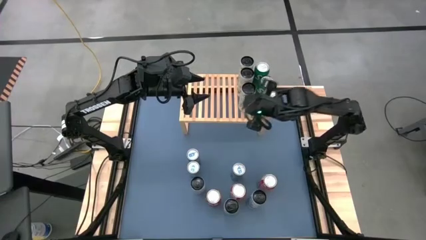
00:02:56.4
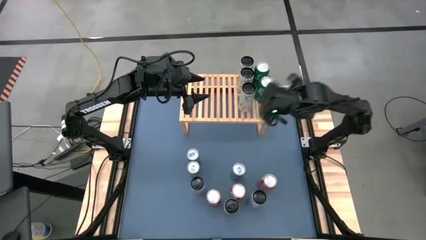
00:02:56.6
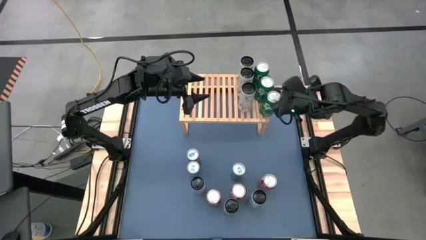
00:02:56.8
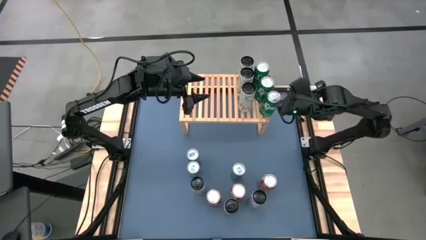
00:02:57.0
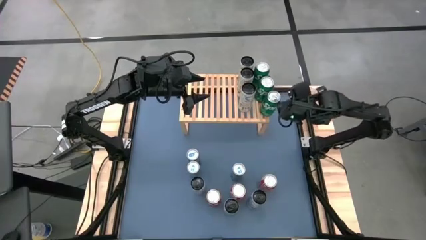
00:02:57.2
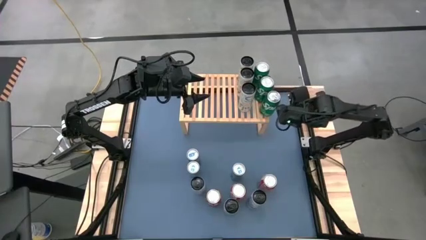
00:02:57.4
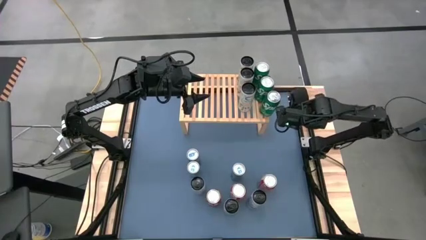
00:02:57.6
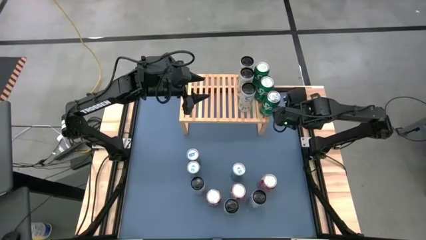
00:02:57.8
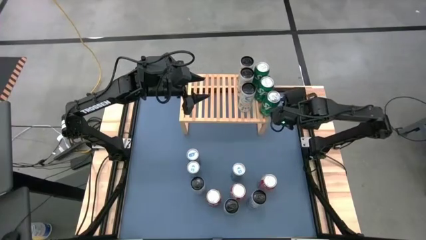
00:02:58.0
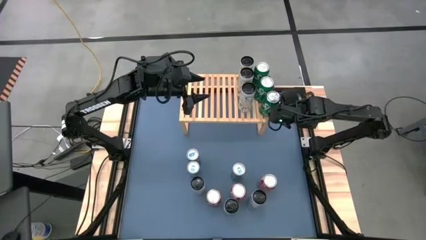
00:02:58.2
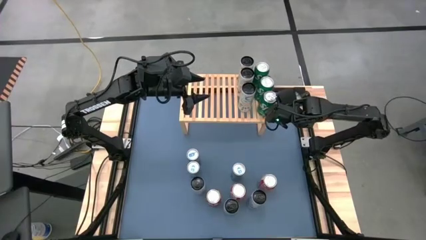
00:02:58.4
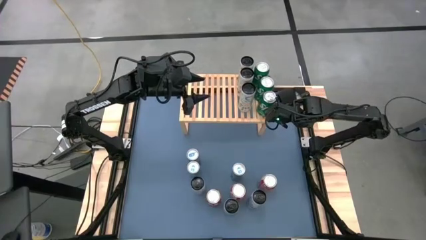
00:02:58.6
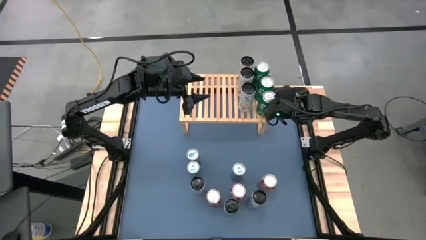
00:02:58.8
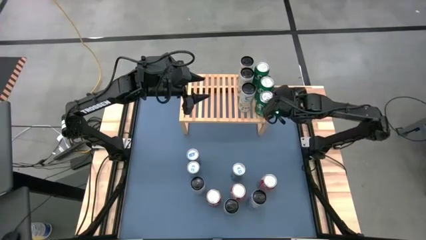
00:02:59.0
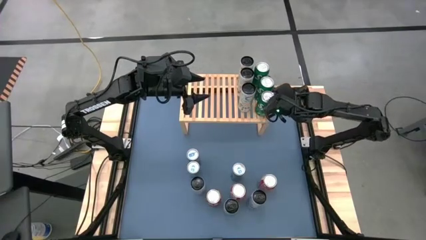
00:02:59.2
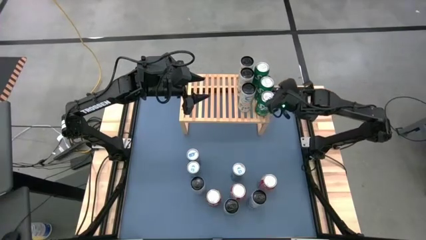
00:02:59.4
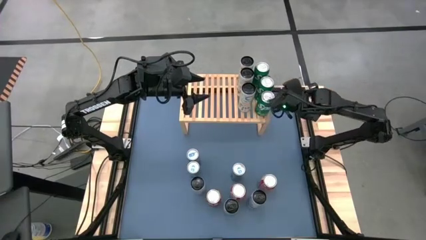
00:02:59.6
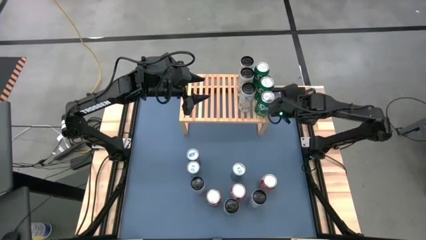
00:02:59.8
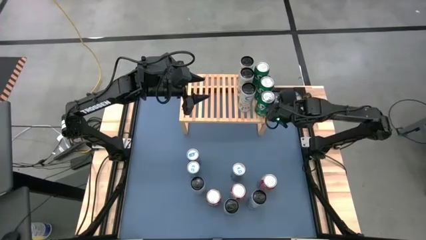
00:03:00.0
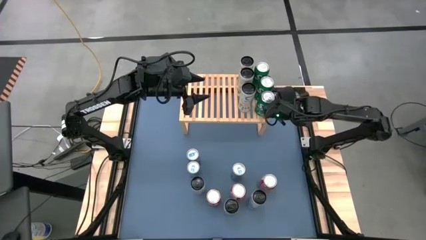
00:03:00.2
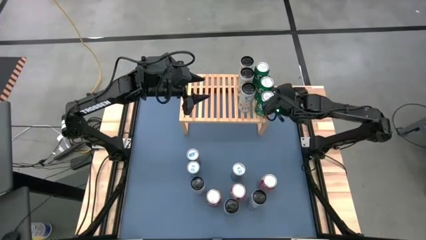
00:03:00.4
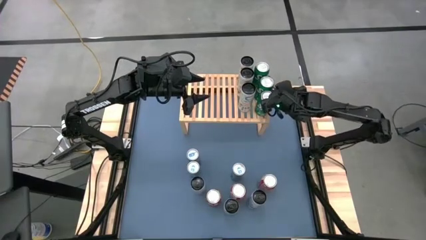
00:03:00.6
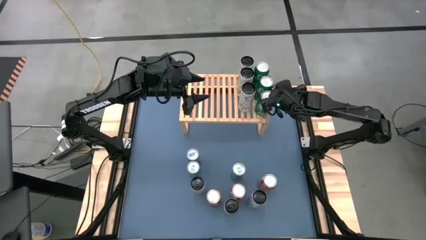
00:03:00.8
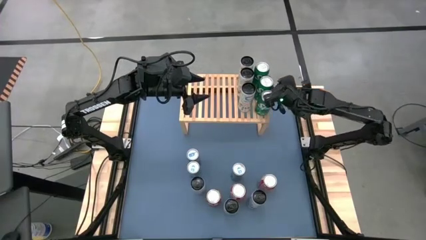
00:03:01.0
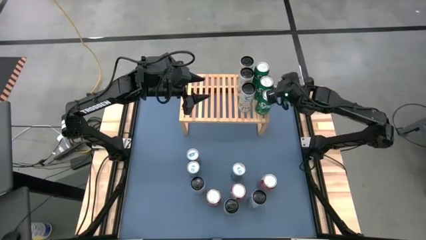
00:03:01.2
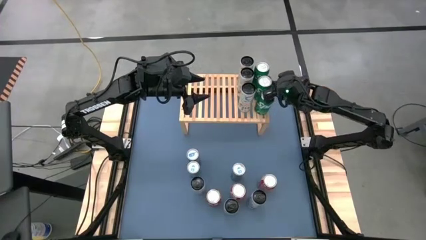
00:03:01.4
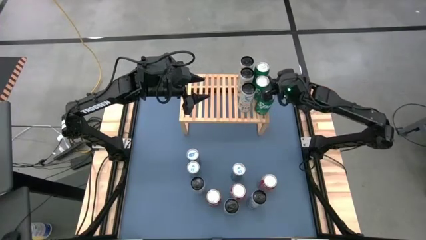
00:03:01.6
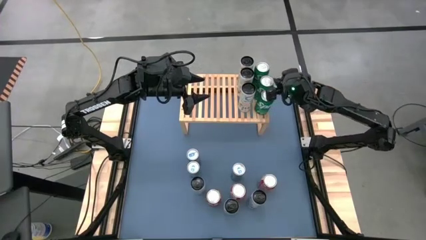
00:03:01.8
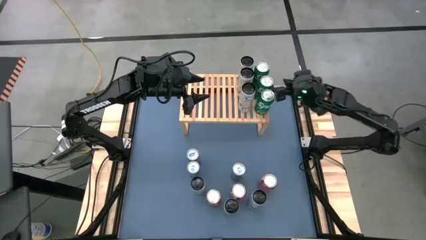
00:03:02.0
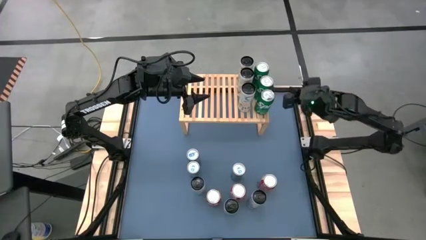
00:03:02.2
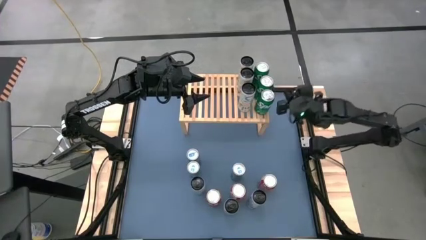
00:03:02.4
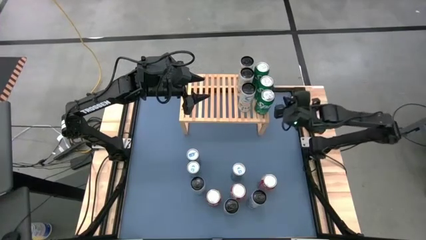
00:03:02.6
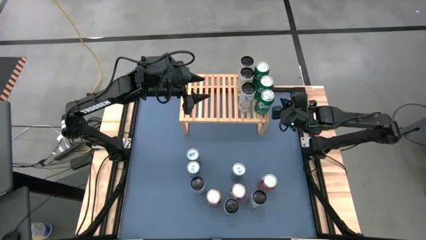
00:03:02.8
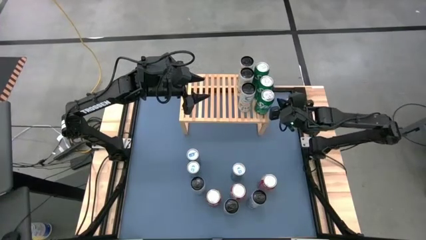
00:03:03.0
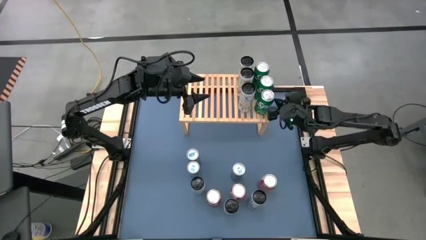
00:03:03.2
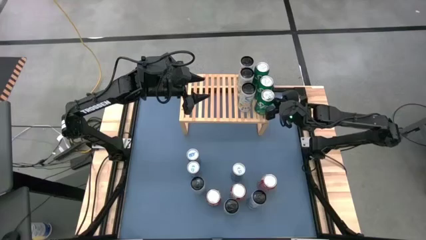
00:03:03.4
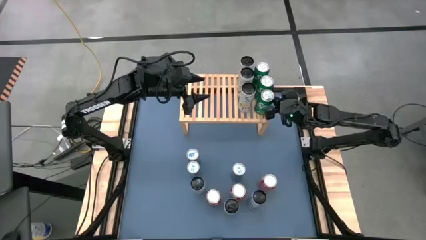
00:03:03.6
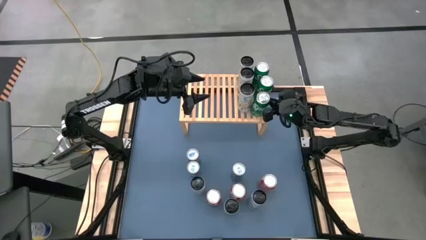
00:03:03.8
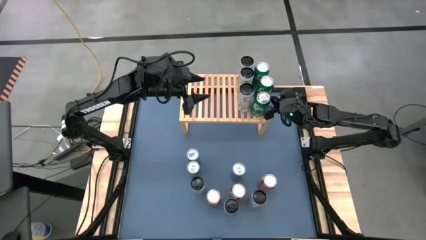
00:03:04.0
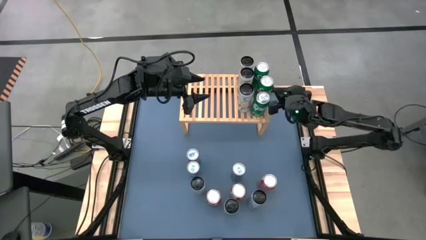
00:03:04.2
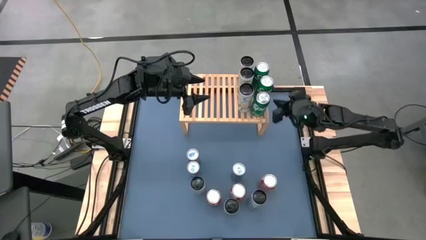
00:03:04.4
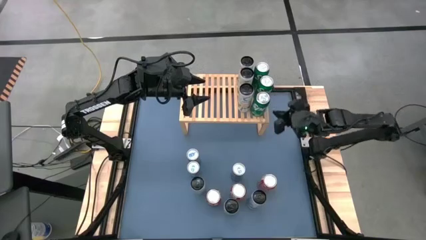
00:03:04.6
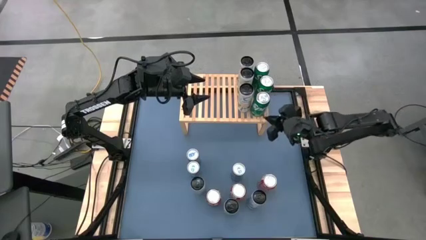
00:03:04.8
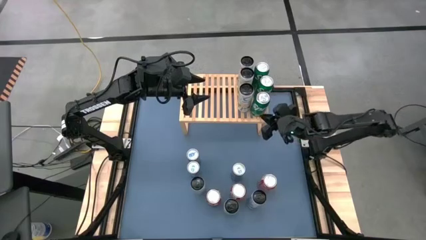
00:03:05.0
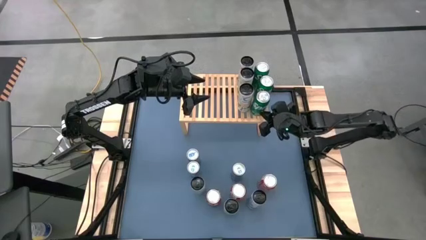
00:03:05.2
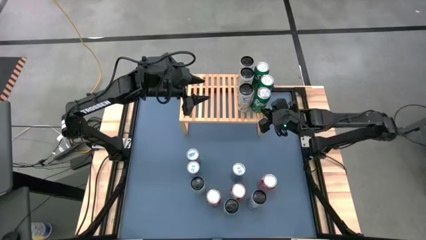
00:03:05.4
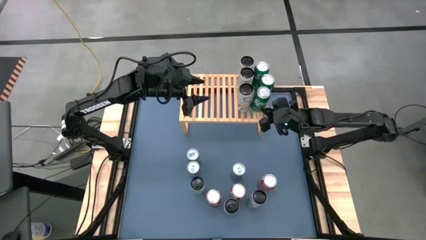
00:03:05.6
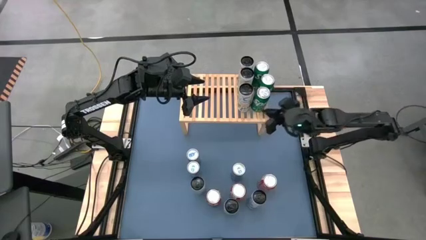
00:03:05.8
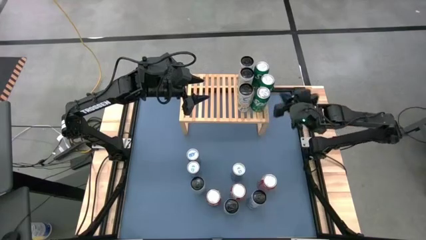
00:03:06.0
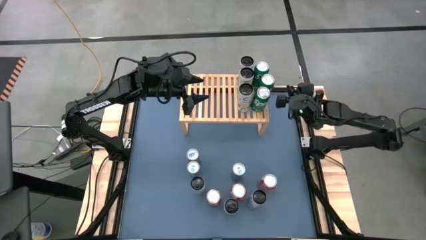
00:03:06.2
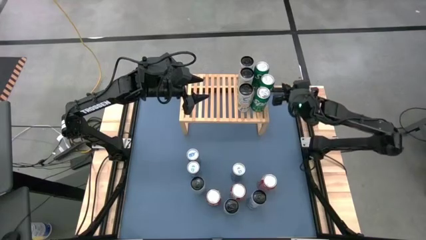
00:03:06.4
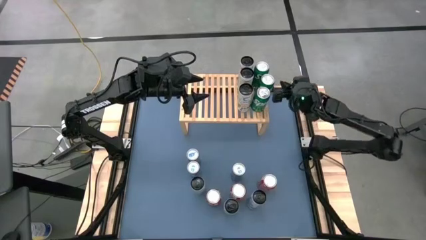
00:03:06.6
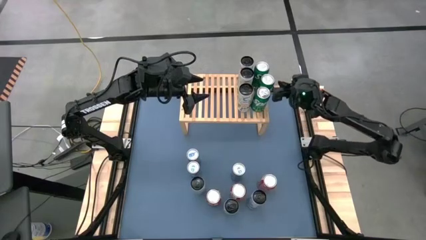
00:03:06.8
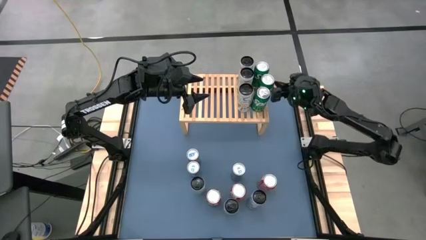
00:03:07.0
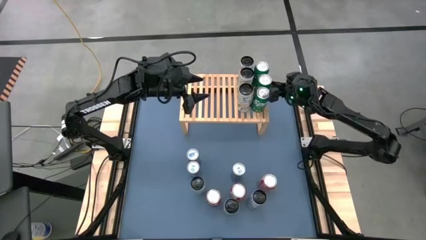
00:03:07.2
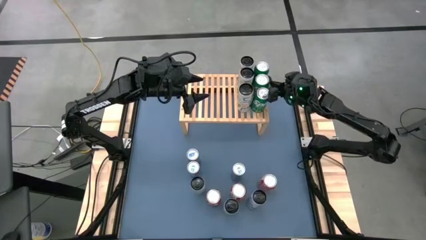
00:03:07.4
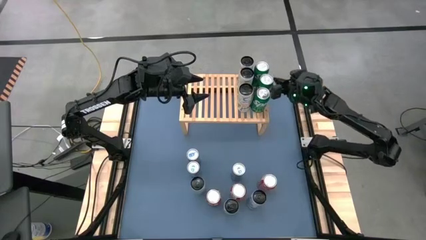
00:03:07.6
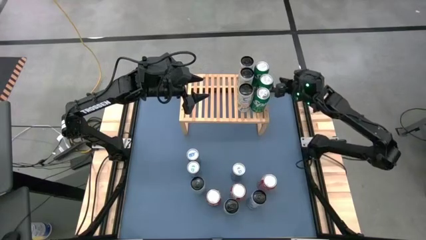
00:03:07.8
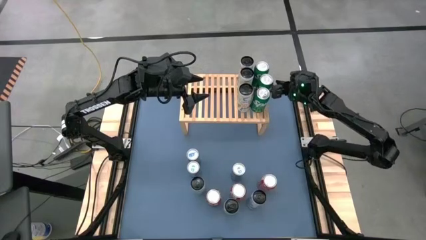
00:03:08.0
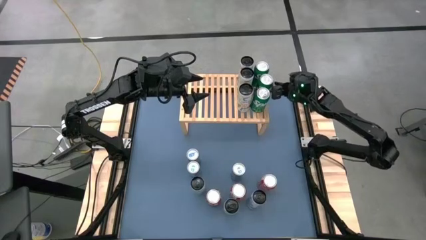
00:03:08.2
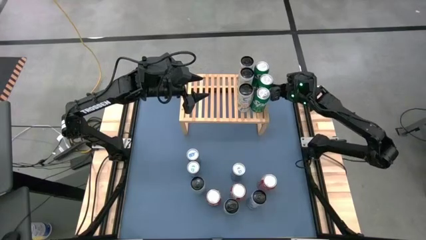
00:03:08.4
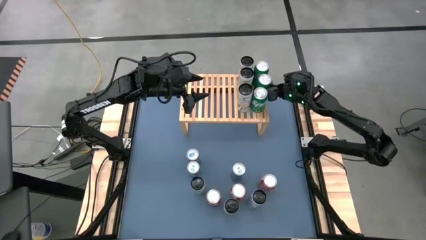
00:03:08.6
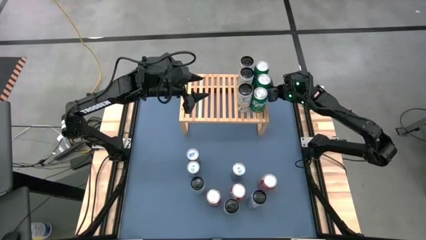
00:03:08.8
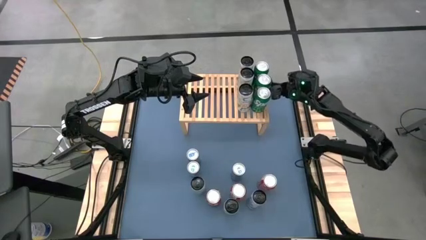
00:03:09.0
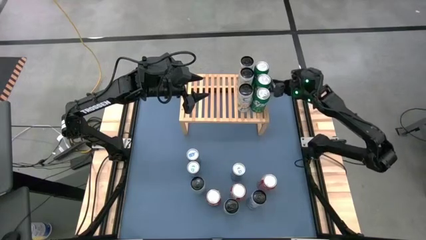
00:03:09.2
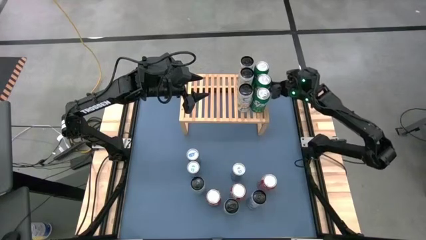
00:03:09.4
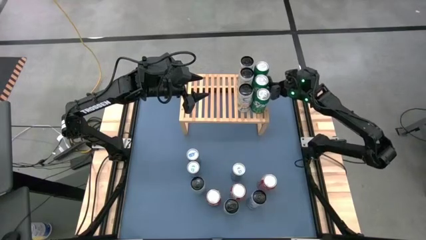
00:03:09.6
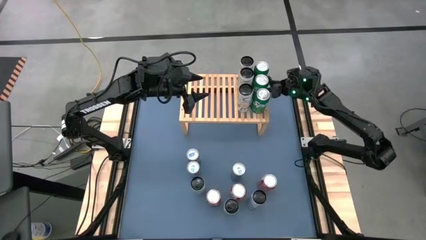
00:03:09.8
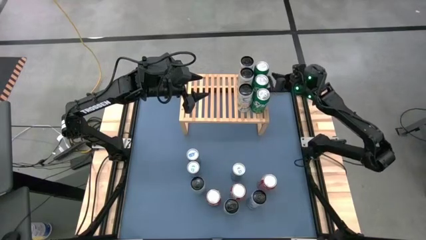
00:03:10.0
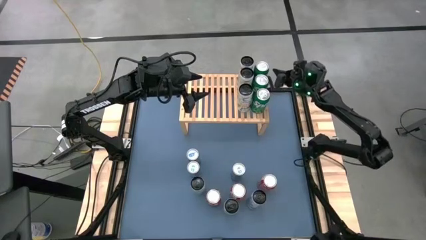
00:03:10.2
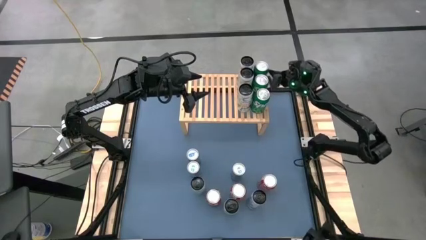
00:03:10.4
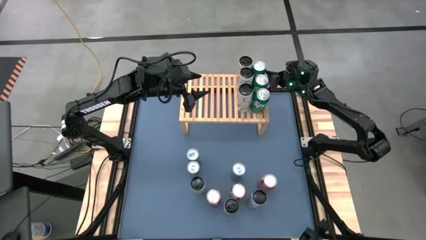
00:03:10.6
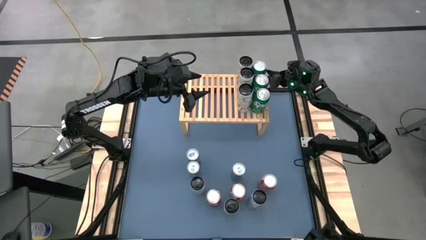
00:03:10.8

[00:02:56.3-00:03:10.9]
Task: Place canned beverage on shelf
Adjust the green soda cans on the shelf
